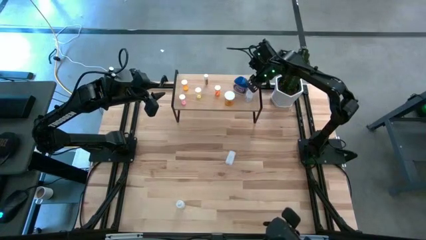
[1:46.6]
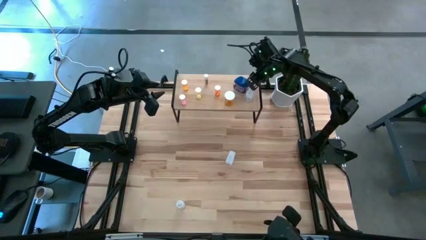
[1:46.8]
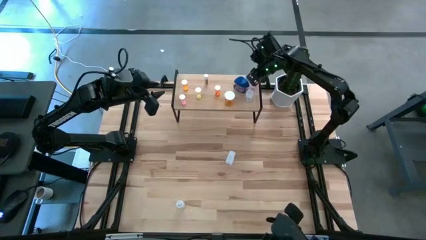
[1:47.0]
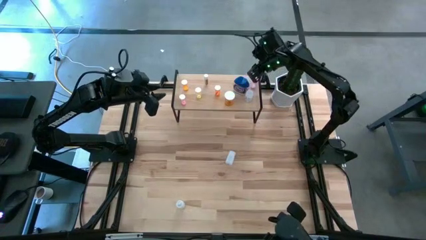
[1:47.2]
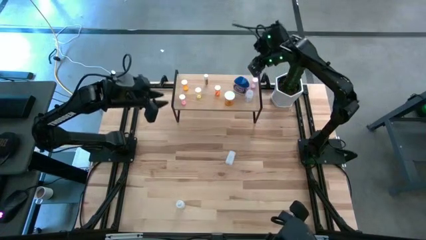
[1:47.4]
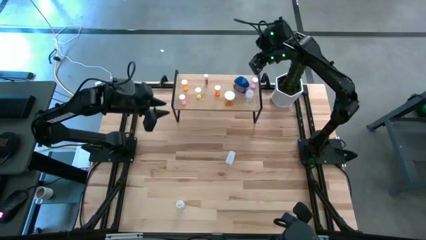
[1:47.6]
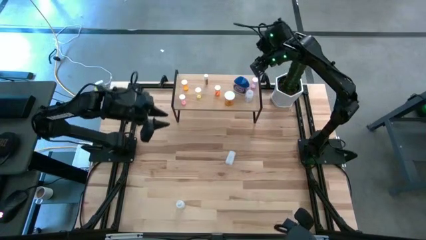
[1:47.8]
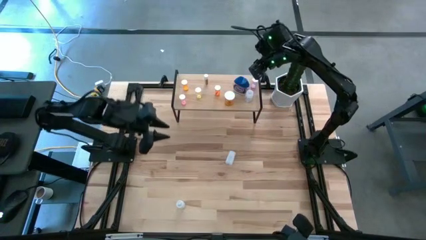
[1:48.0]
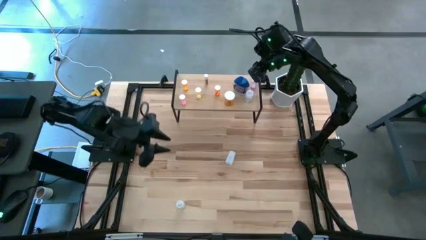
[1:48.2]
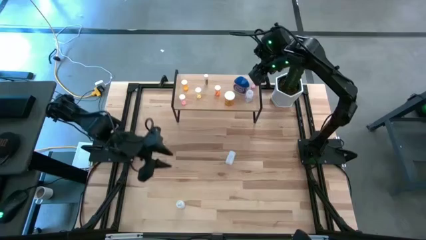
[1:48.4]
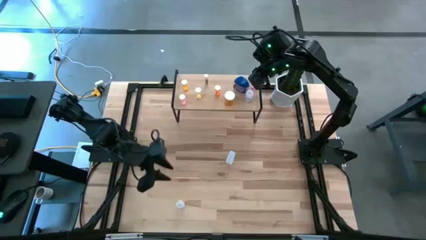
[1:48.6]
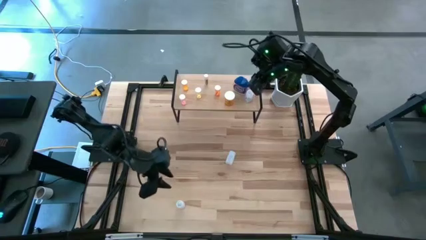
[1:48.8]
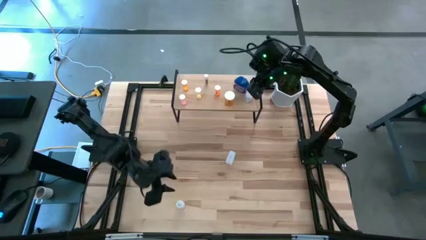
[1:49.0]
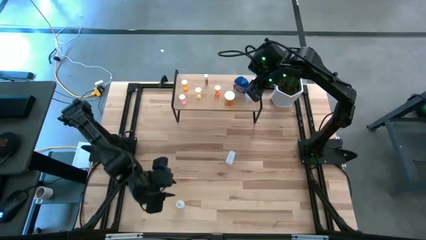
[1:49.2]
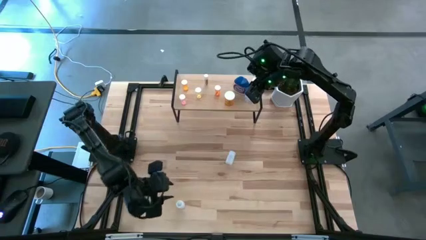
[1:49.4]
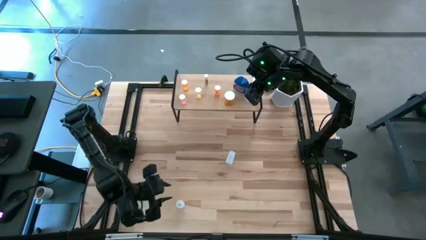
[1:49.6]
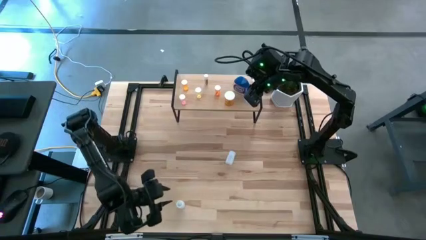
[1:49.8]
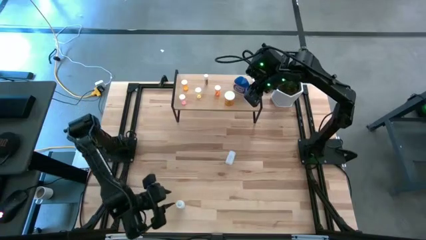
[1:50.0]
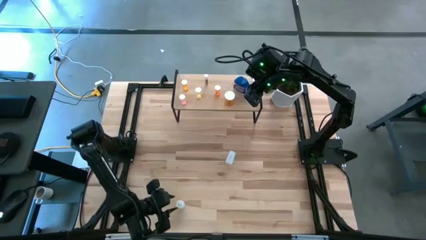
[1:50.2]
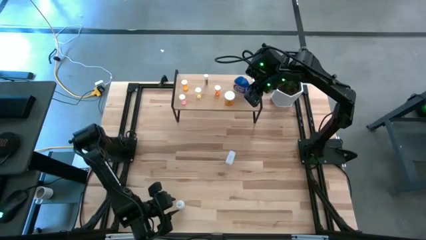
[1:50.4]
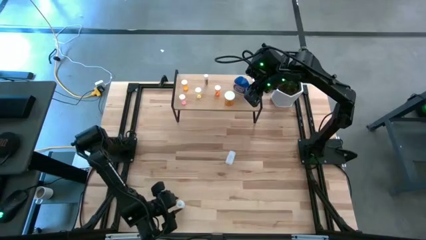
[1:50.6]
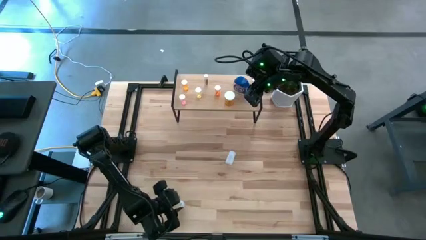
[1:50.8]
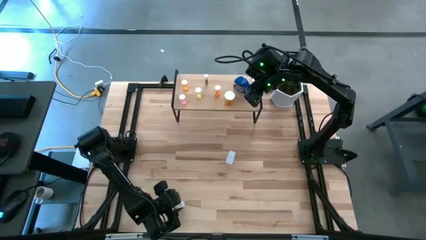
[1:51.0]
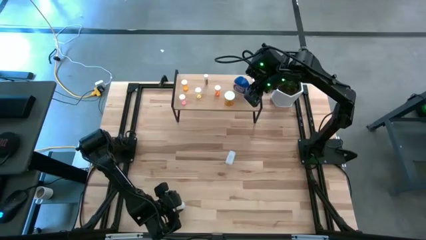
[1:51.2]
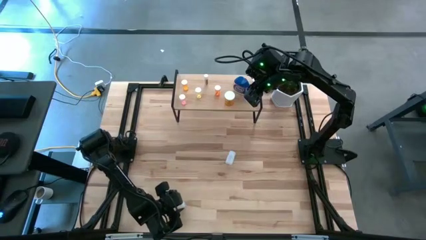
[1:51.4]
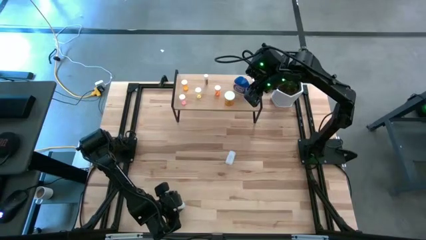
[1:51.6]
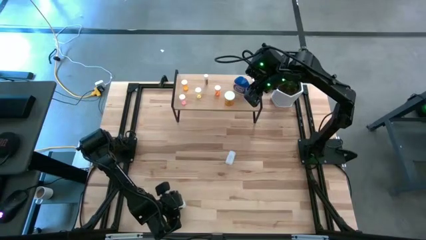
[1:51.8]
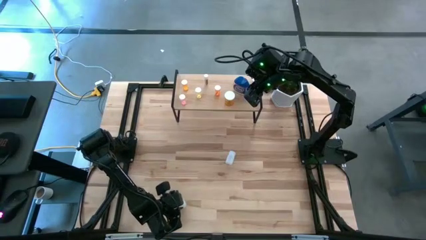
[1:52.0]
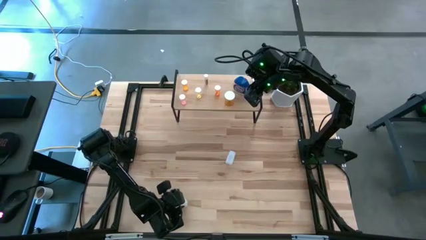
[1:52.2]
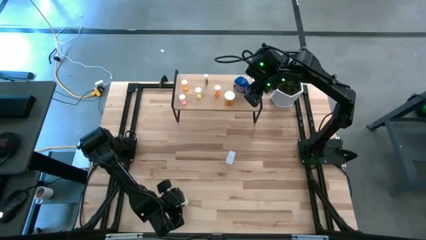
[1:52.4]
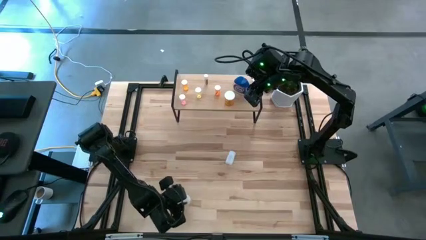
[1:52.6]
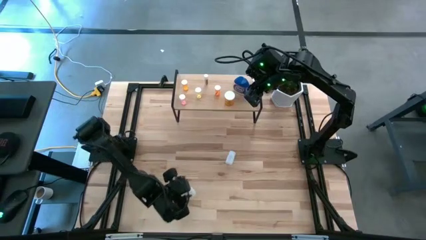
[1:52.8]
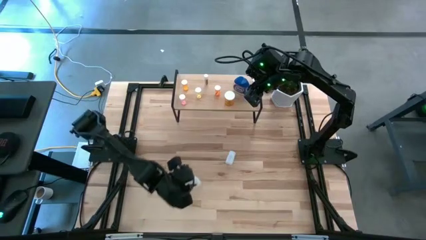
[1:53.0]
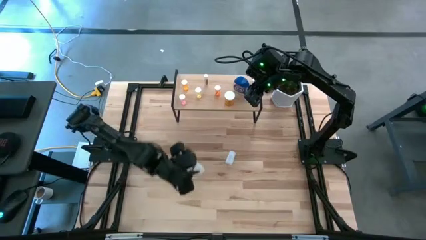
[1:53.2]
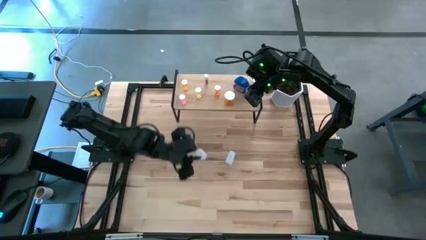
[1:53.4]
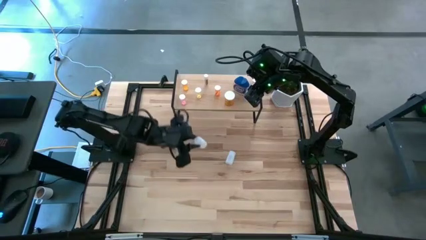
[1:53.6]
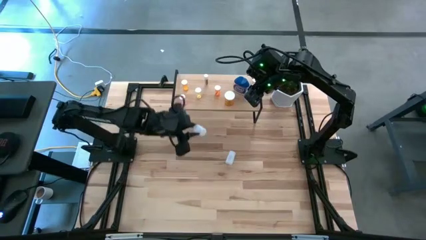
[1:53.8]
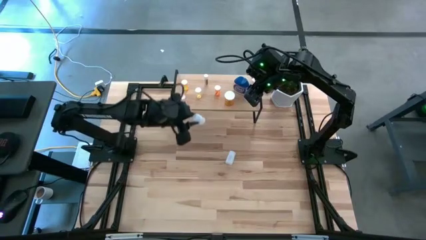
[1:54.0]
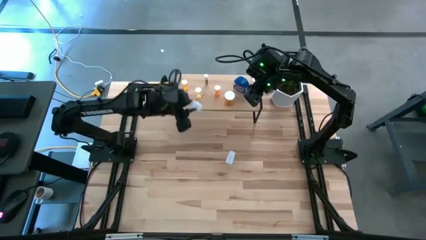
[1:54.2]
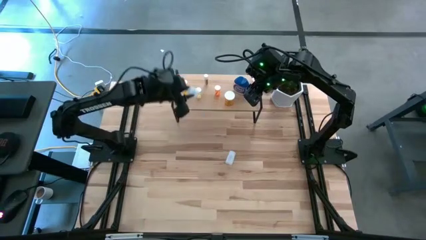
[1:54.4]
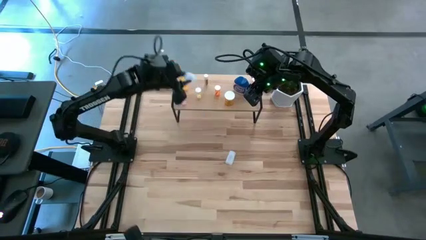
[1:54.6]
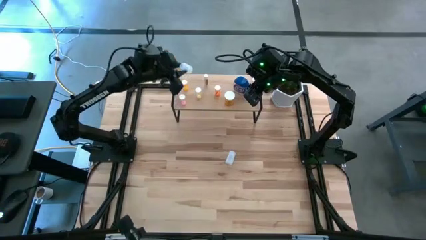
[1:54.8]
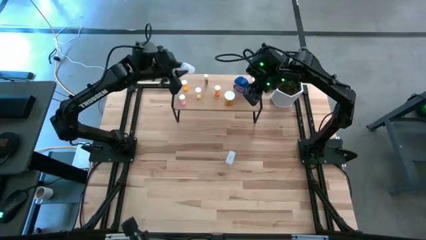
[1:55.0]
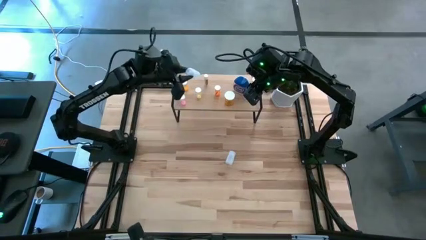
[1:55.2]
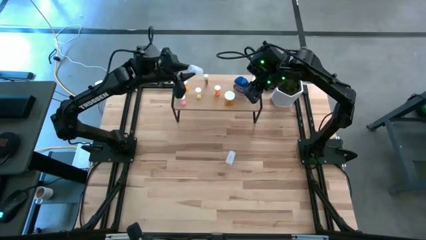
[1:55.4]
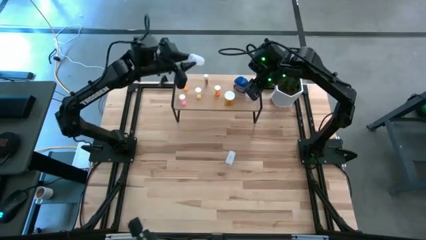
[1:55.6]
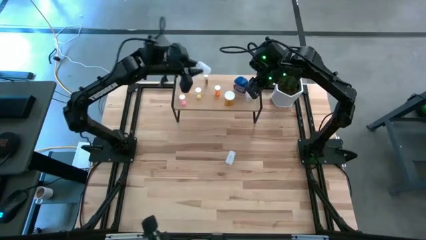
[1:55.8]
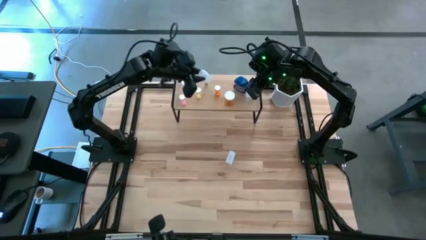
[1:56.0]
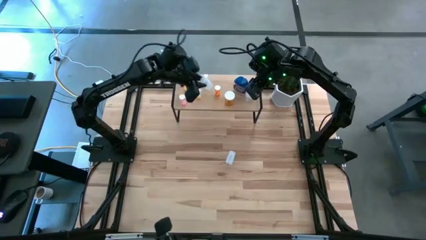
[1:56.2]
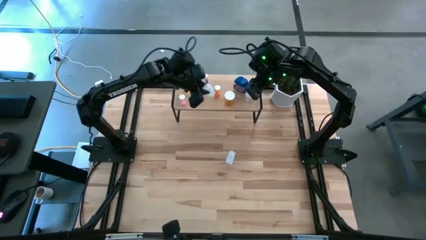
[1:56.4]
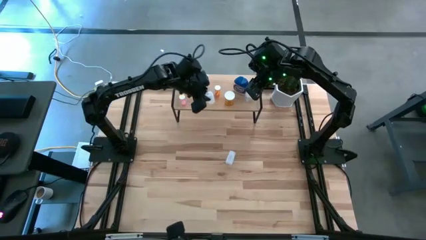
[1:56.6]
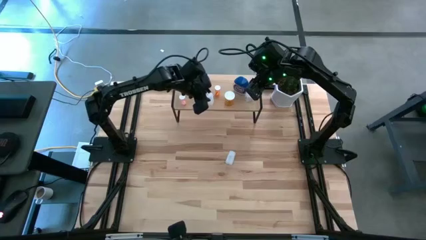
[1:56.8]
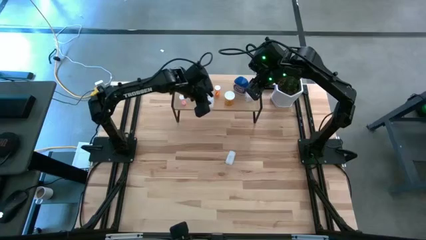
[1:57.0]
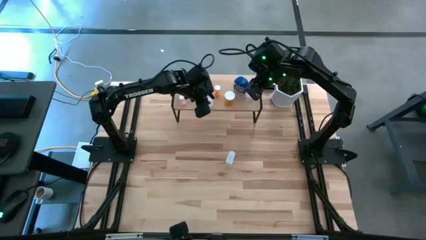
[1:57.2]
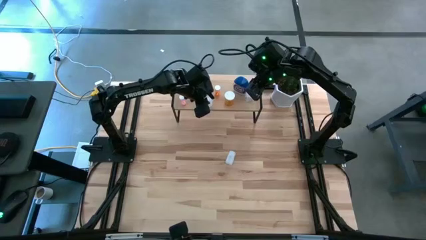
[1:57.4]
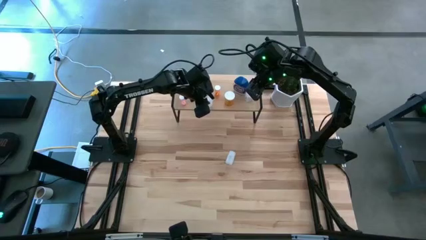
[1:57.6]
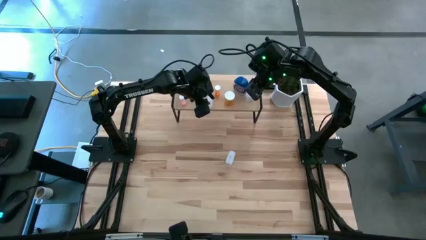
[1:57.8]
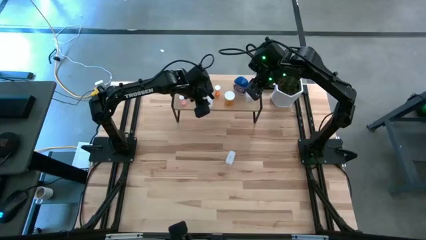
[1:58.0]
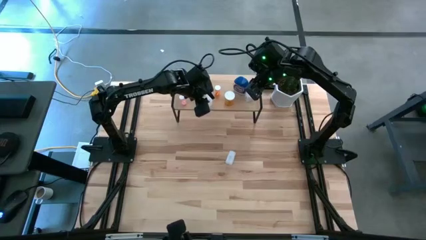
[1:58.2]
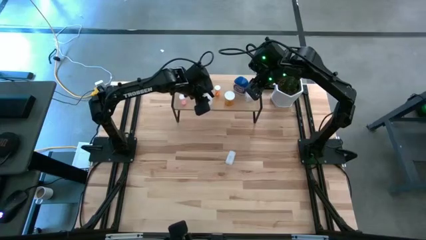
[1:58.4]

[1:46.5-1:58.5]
Task: Pick and place medicine bottles onto shelf by color
Put the bottom transparent pill bottle on the shelf

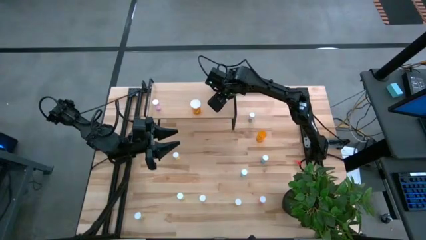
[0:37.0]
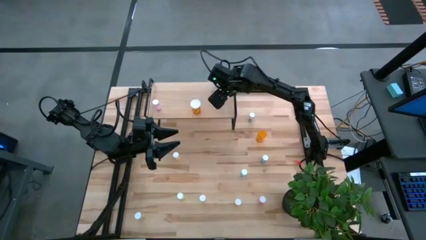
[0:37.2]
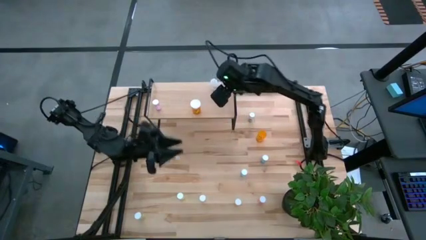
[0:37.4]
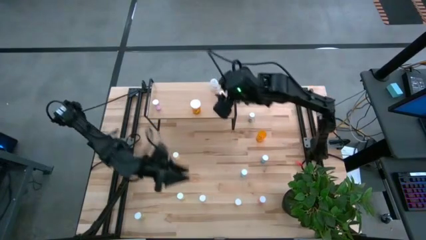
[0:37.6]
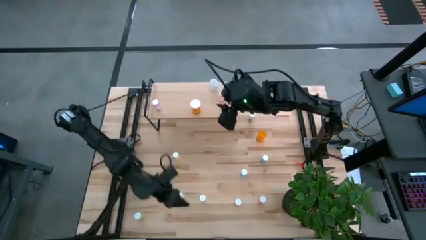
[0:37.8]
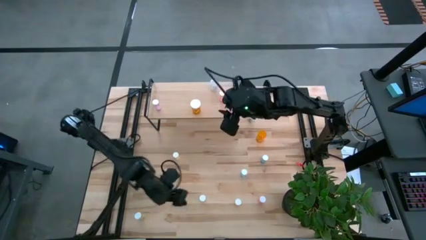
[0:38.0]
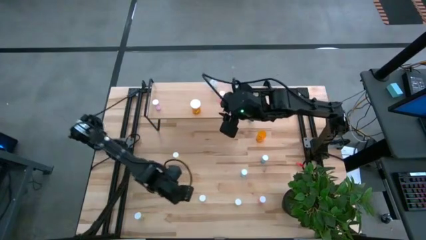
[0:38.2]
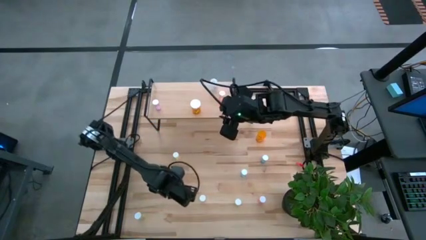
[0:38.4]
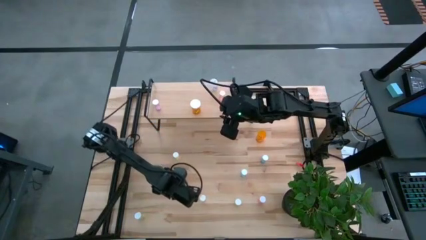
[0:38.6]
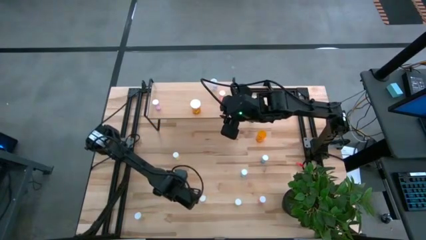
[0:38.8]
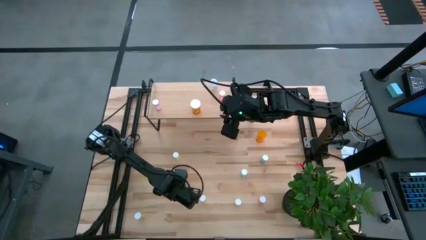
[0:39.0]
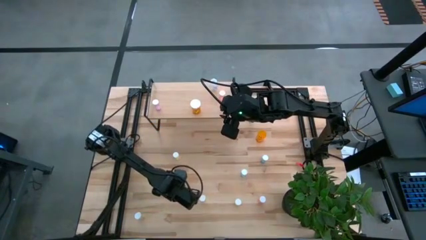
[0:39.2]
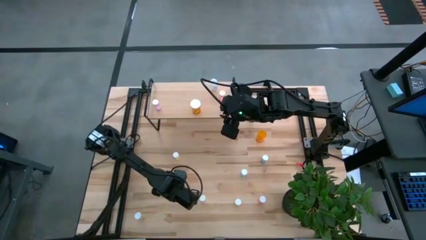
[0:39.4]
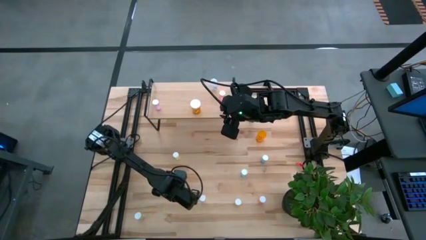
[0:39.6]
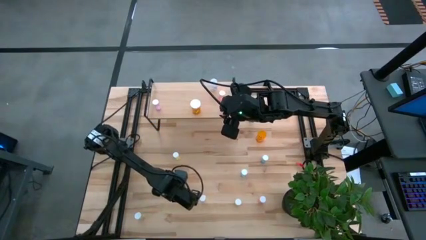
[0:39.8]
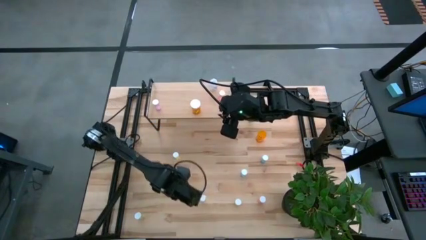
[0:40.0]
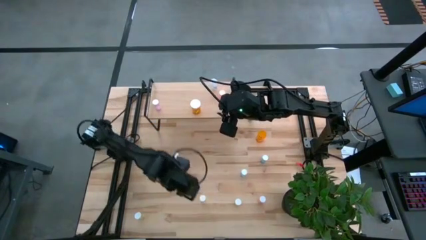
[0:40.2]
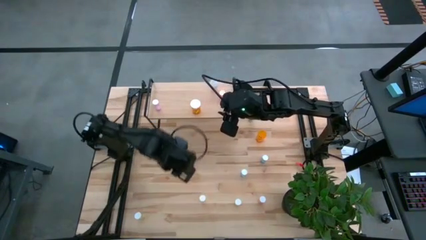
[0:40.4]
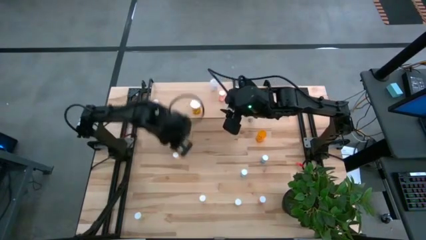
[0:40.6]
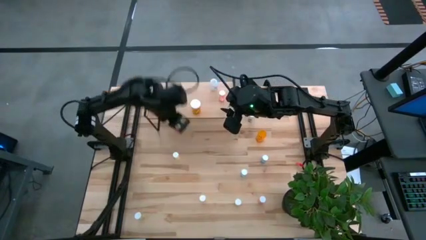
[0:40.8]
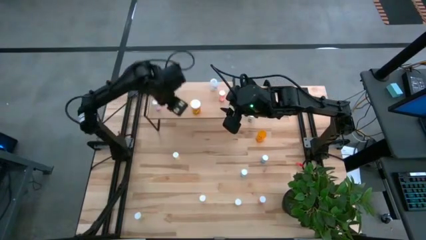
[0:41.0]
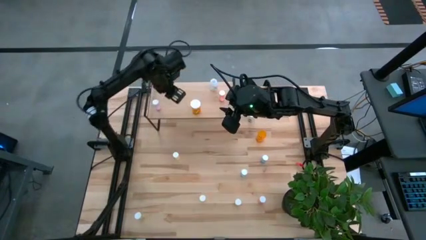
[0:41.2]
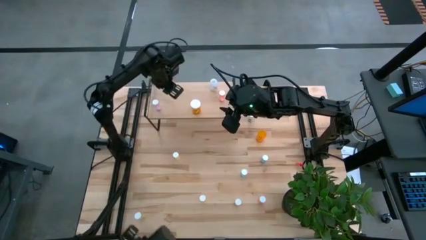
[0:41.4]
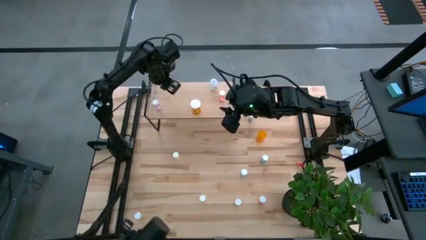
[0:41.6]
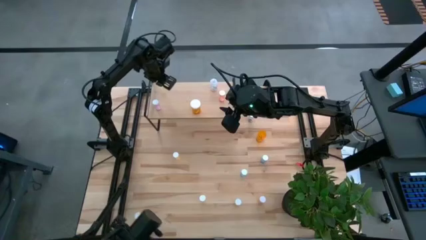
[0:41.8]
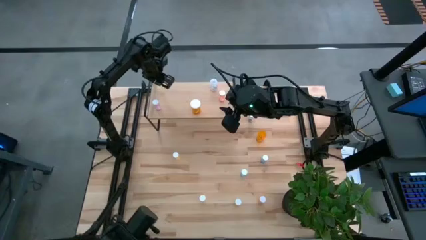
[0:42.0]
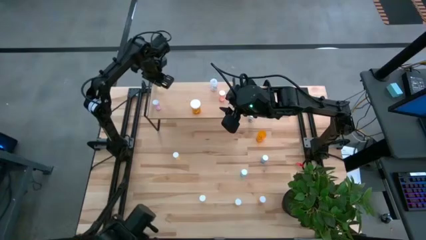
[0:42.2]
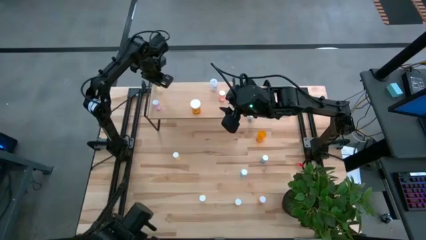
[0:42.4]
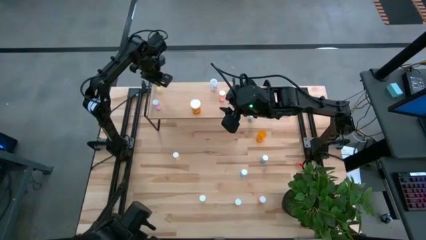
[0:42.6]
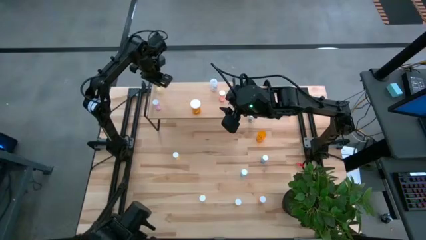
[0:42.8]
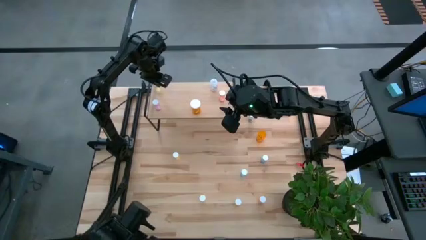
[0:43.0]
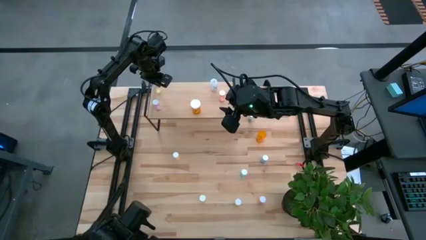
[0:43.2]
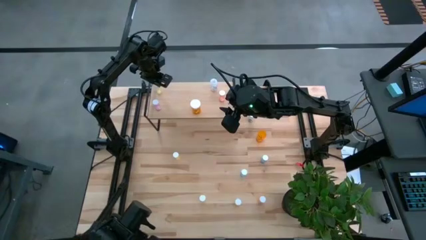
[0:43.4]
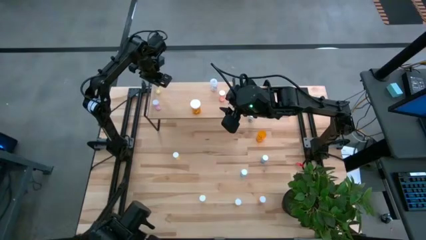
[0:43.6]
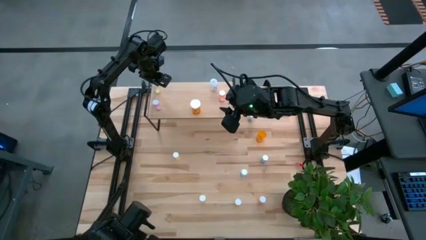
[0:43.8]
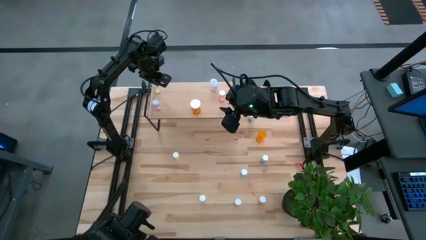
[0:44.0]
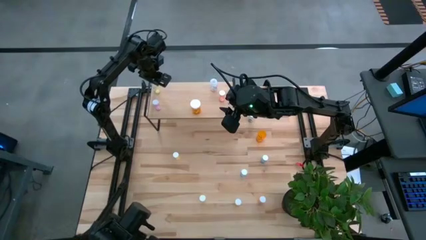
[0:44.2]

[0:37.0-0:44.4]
Task: Pick and place medicine bottles onto shelf by color
Put the yellow pill bottle on the shelf
